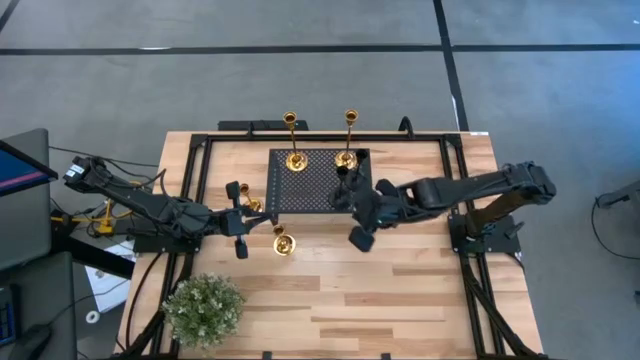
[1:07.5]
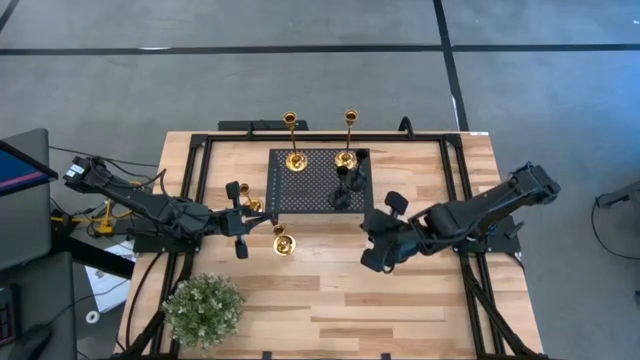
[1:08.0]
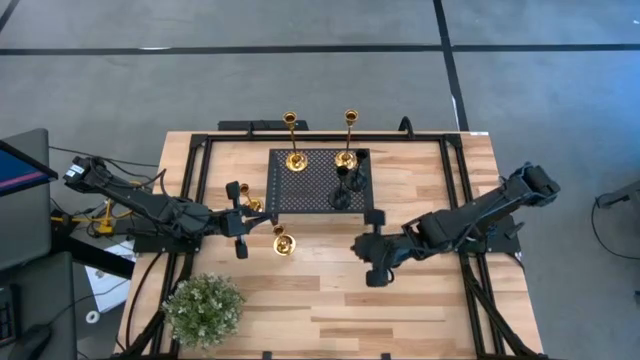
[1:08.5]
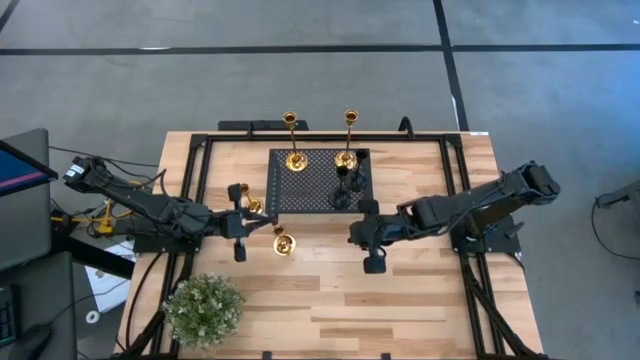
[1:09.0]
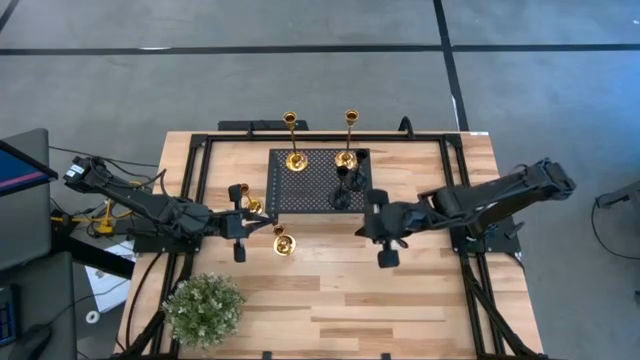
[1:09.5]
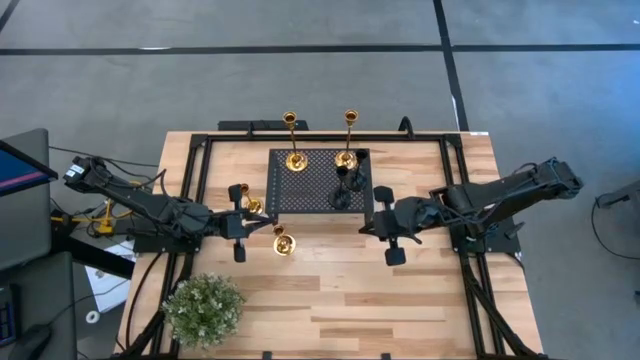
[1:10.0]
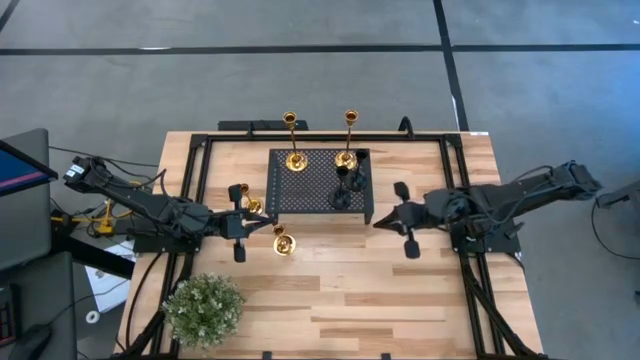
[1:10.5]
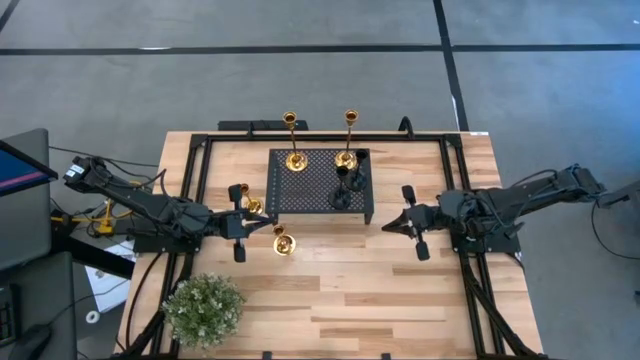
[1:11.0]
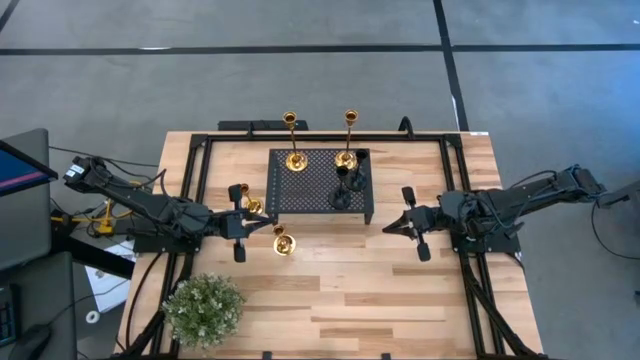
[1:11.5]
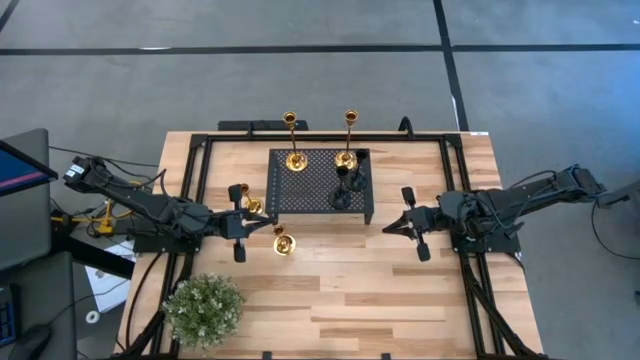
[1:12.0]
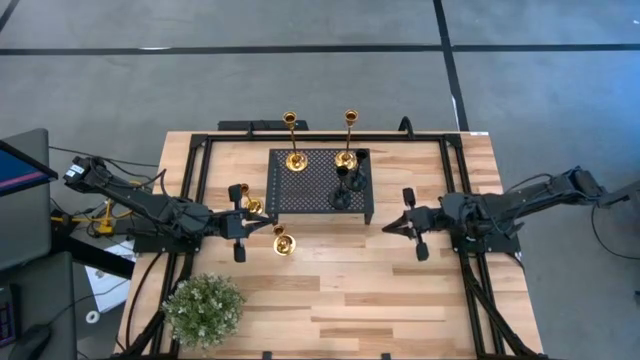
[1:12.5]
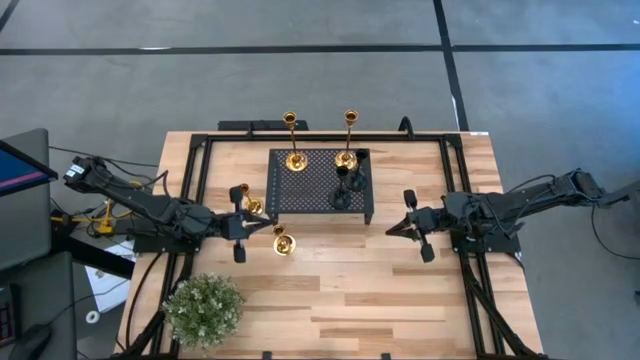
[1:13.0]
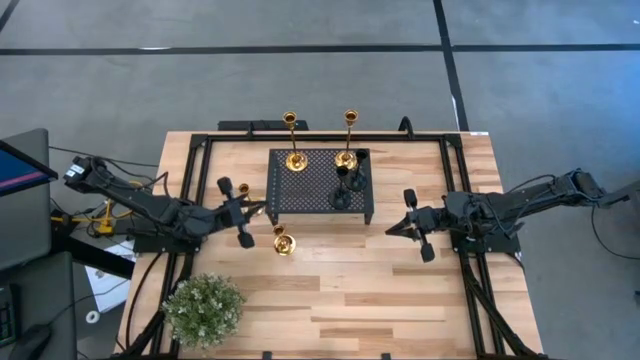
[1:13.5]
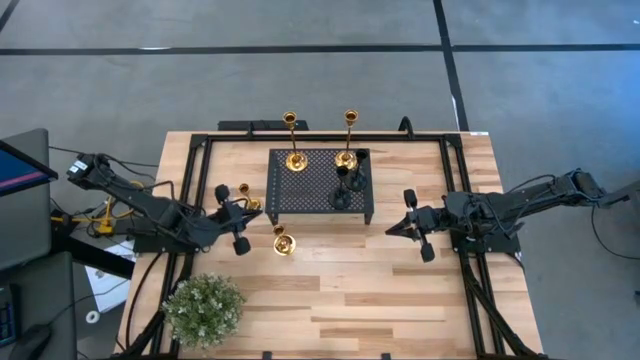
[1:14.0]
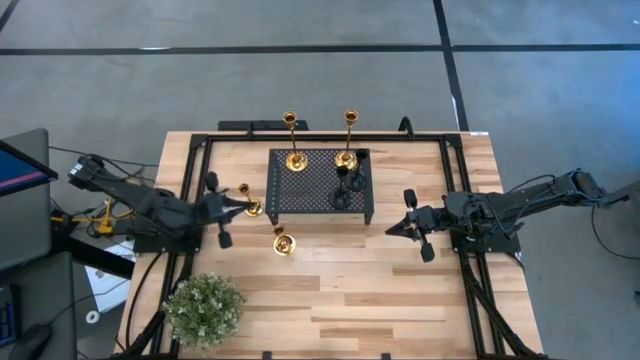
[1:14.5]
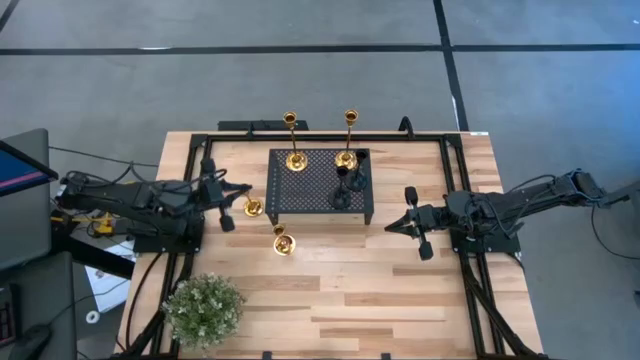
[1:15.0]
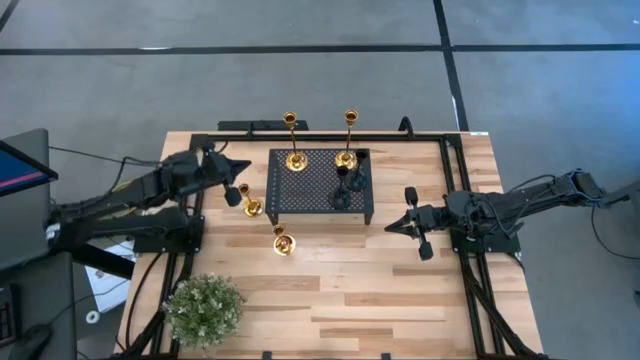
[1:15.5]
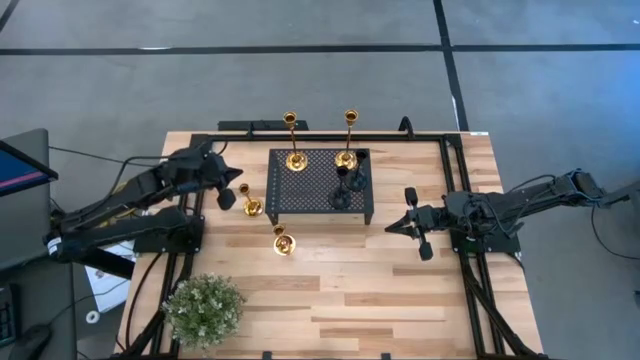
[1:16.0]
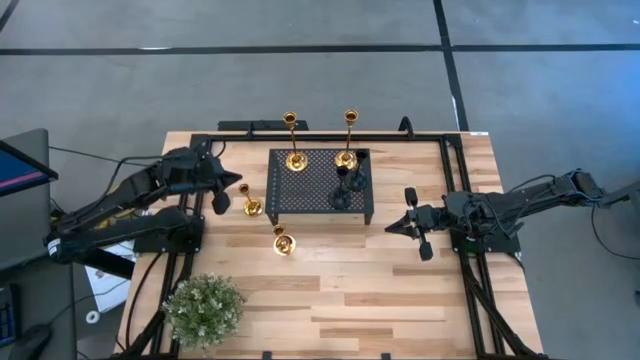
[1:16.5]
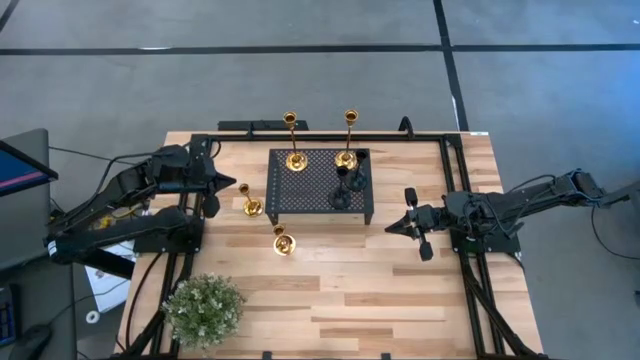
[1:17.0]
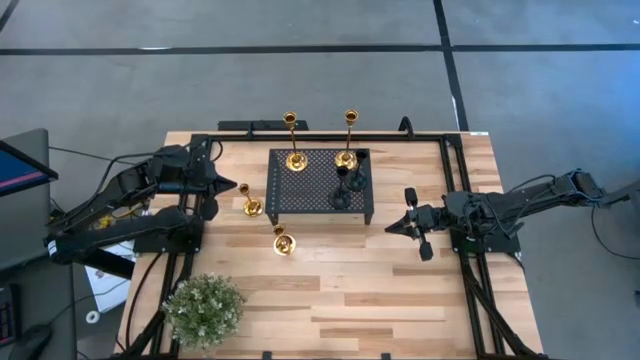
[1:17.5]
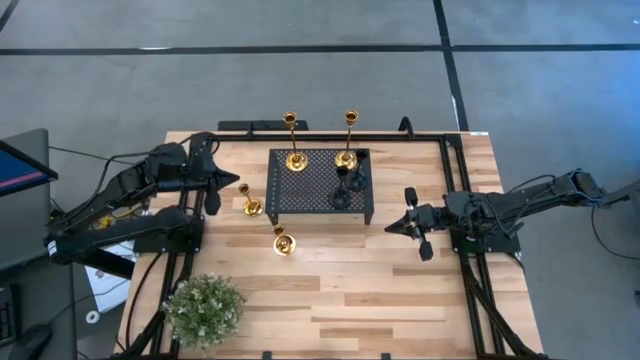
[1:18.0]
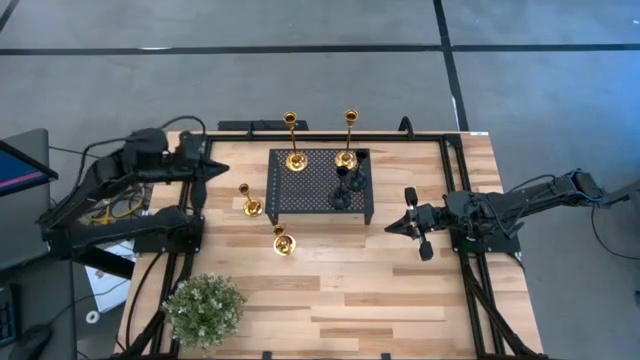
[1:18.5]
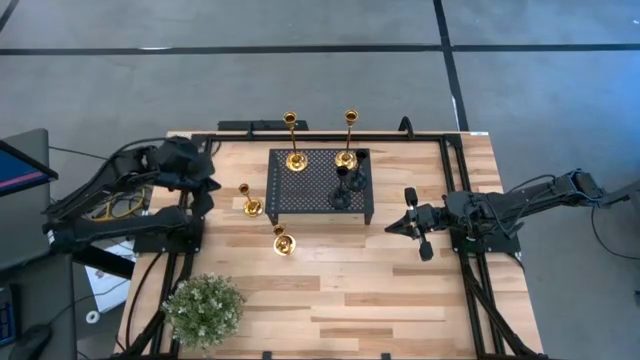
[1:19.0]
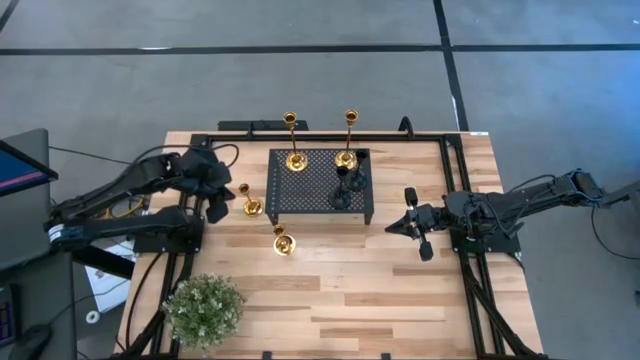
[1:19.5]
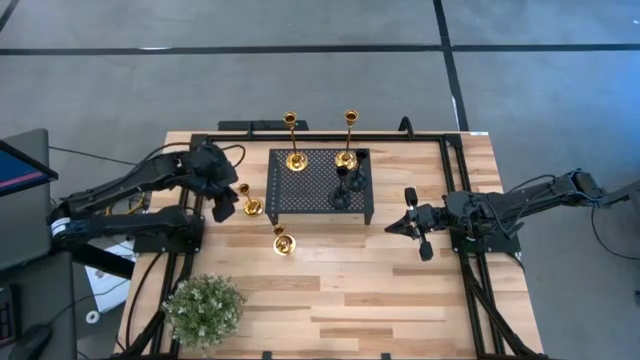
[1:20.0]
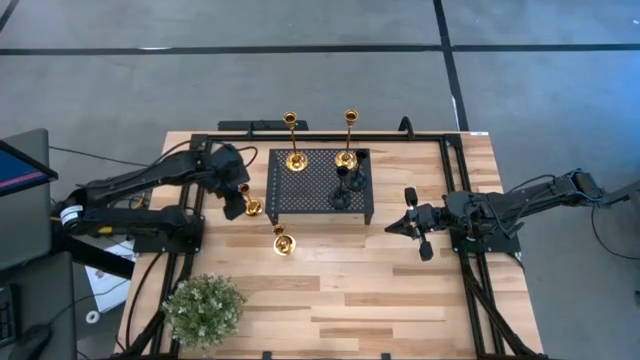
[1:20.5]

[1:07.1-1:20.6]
Task: Pick & Place candle stick holders
Put the golden candle holder on the shelf

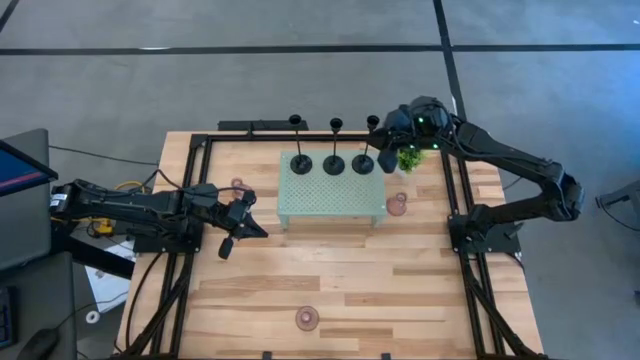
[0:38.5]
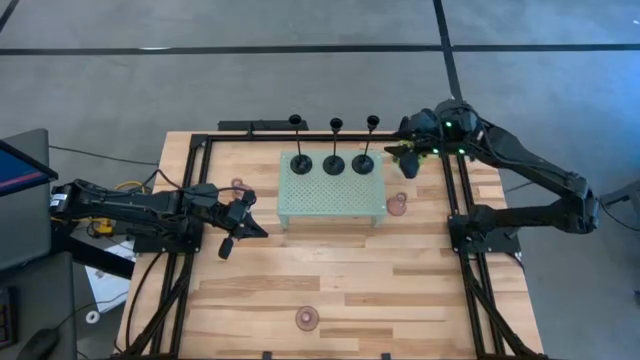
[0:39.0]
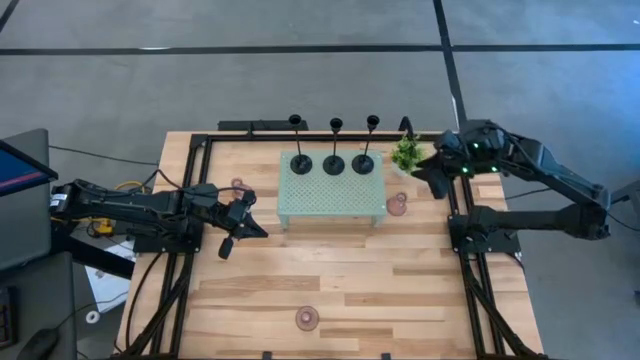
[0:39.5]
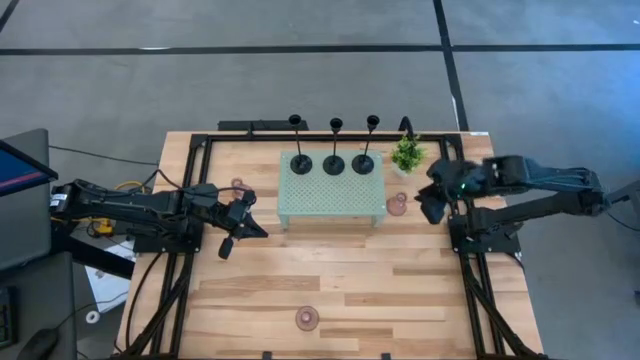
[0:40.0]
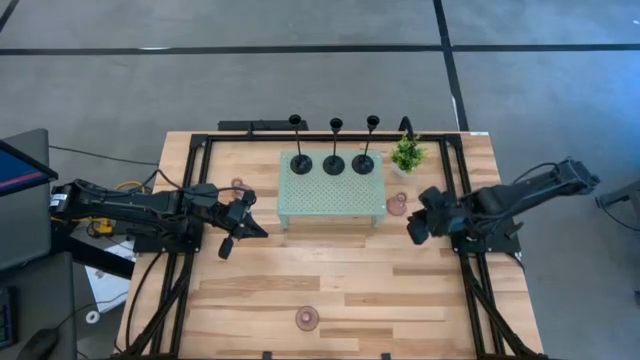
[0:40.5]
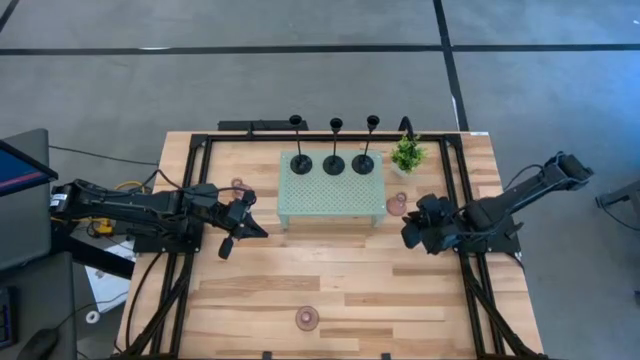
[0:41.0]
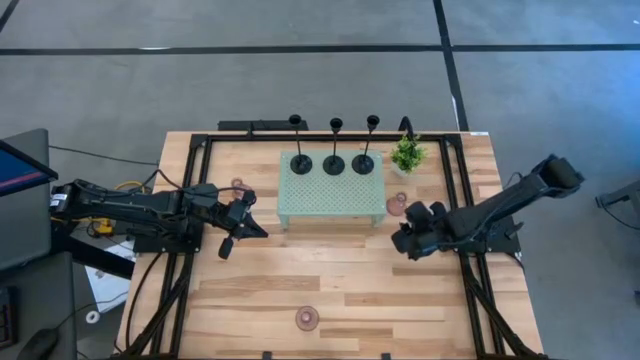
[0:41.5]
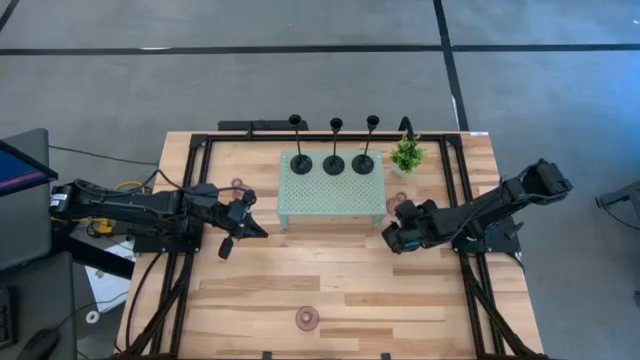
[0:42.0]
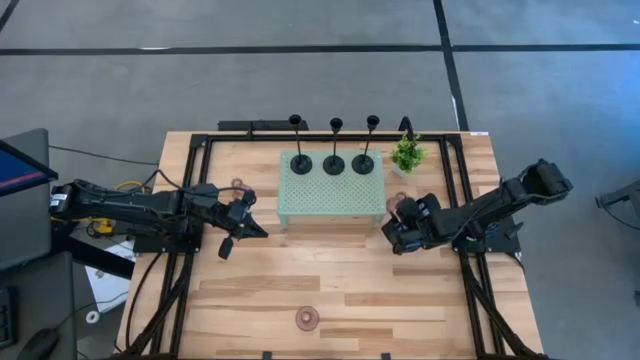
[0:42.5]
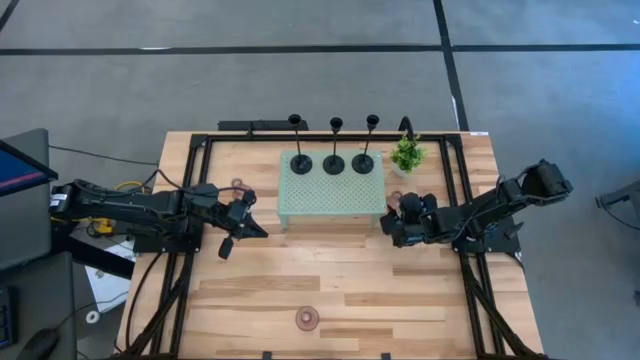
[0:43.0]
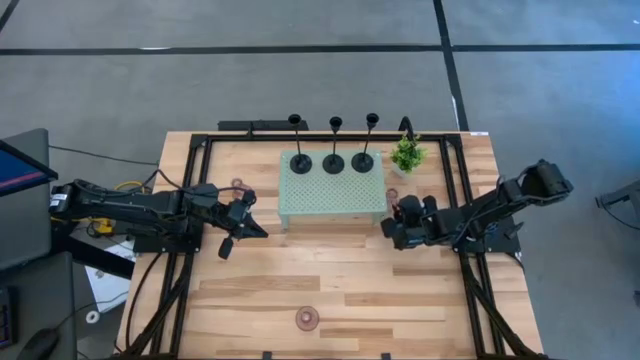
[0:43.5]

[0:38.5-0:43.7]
Task: Pick & Place candle stick holders
Put the top right glass candle holder on the shelf aligned with the other black candle holder

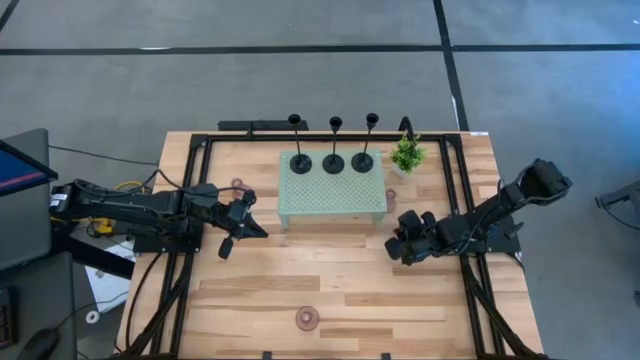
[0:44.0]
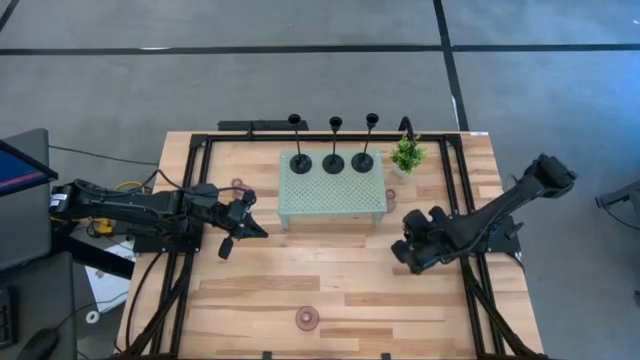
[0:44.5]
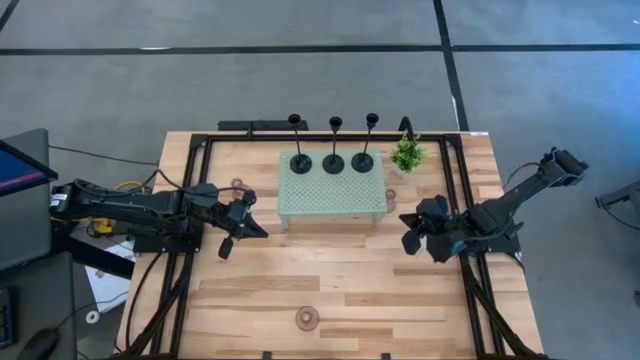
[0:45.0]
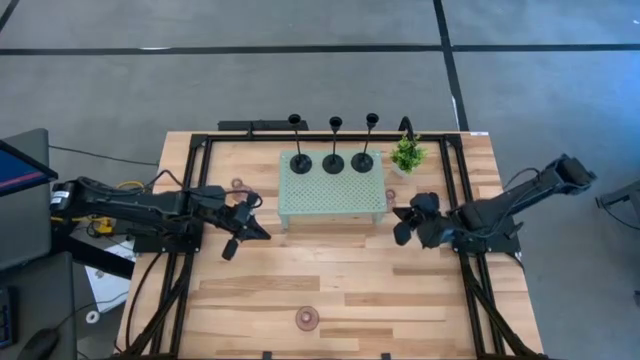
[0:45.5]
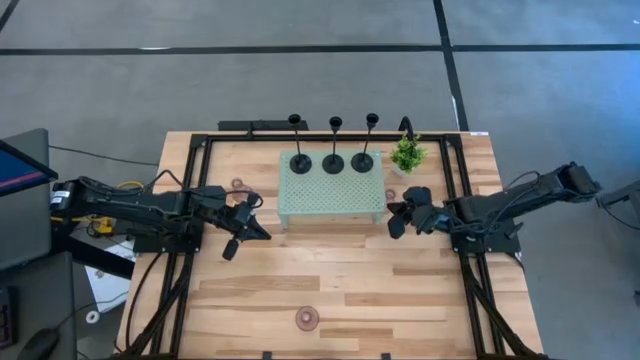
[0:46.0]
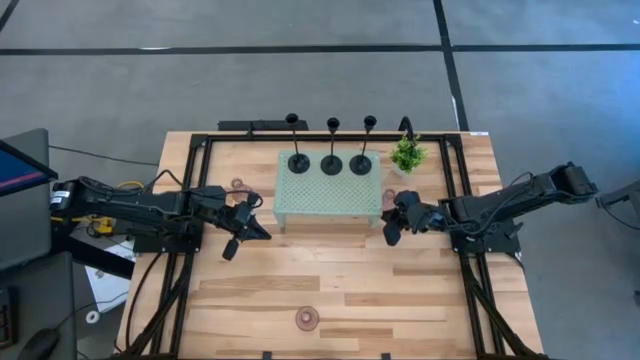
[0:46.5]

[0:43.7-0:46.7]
Adjust the shelf on the table
